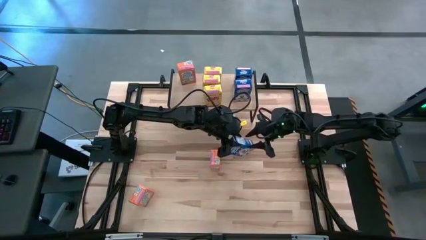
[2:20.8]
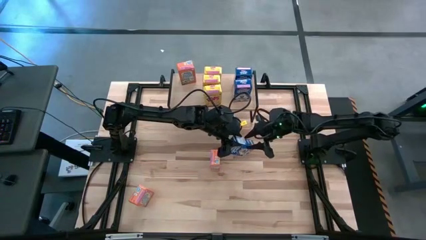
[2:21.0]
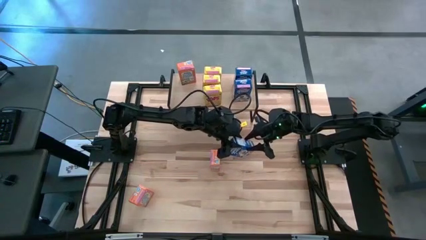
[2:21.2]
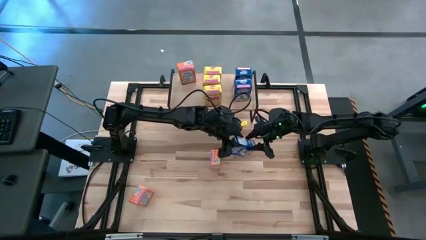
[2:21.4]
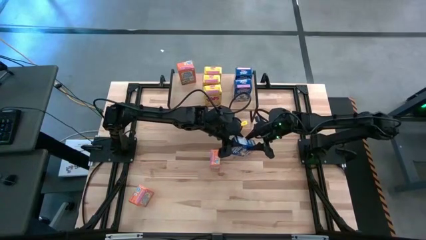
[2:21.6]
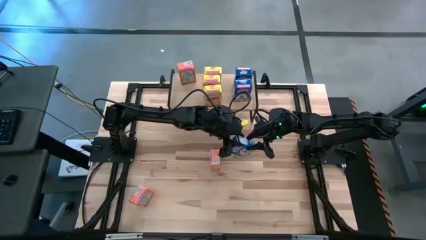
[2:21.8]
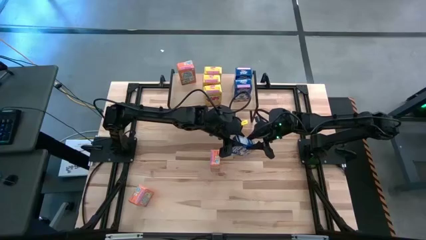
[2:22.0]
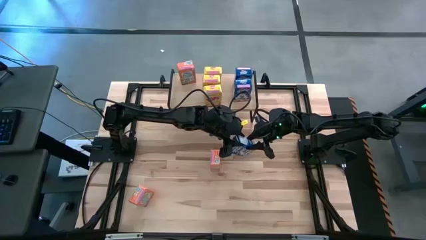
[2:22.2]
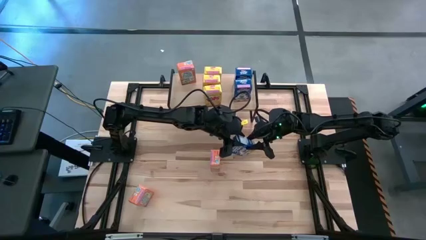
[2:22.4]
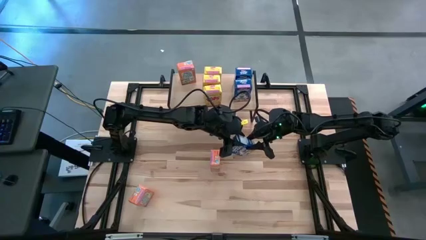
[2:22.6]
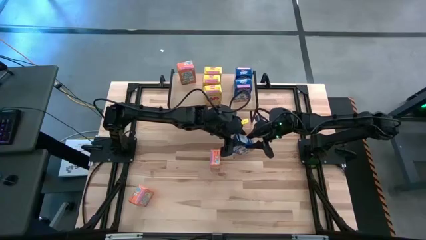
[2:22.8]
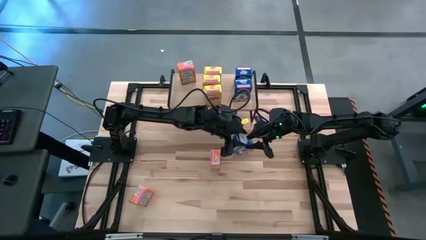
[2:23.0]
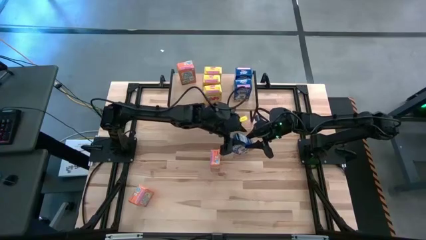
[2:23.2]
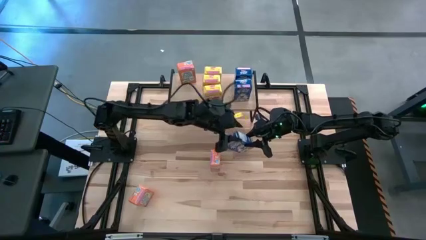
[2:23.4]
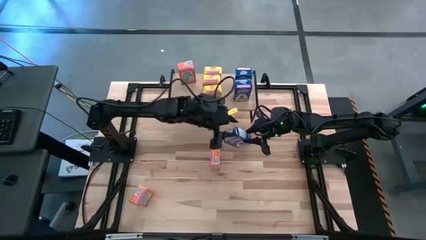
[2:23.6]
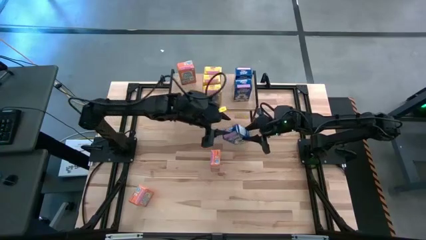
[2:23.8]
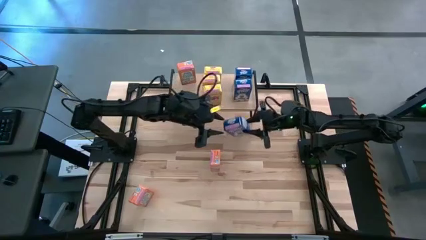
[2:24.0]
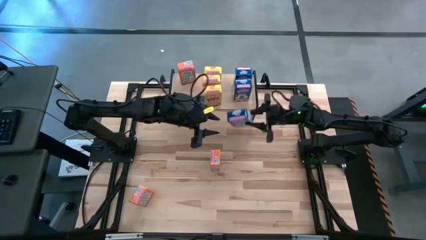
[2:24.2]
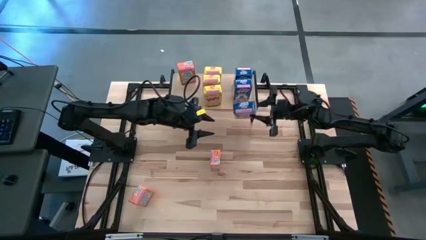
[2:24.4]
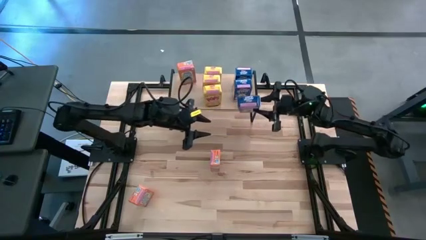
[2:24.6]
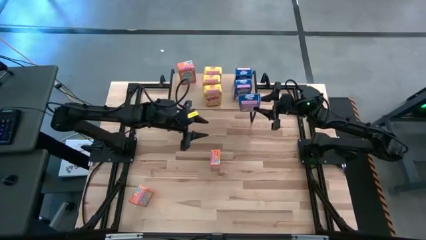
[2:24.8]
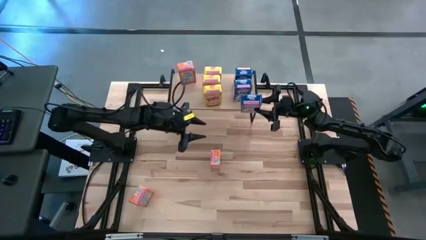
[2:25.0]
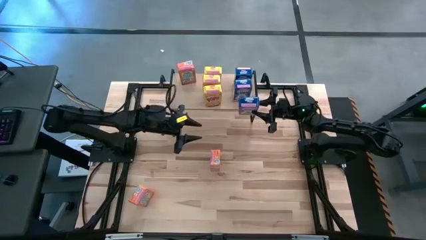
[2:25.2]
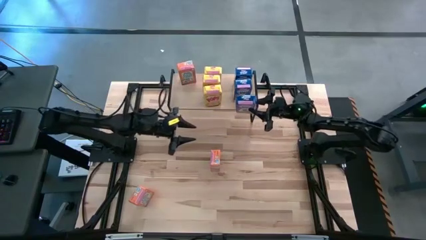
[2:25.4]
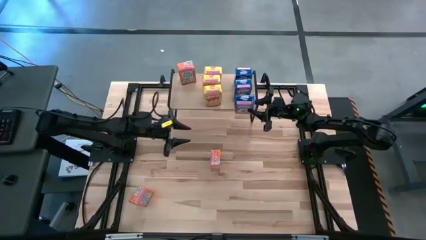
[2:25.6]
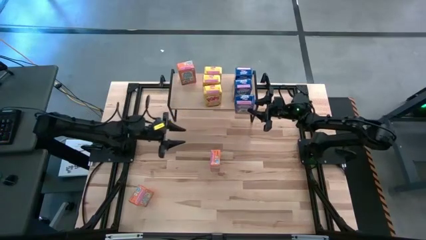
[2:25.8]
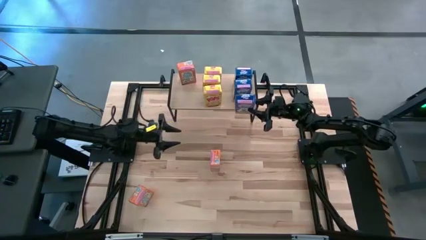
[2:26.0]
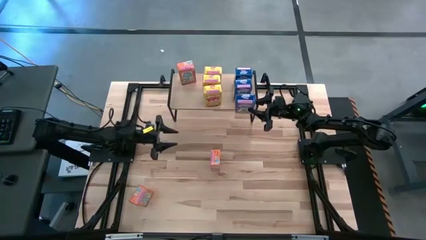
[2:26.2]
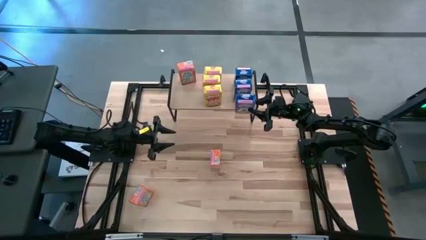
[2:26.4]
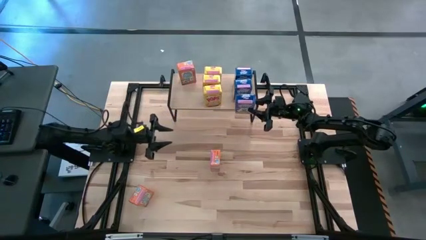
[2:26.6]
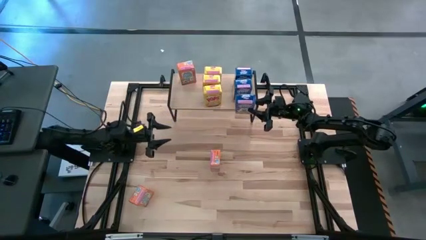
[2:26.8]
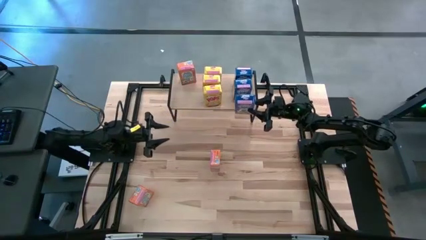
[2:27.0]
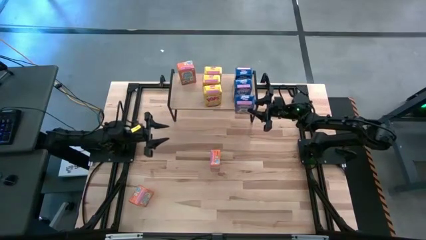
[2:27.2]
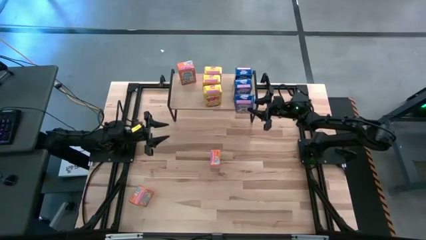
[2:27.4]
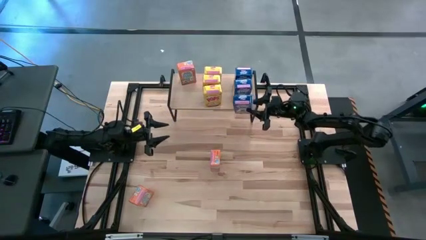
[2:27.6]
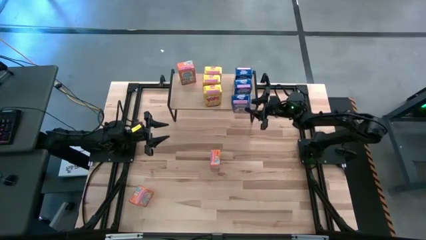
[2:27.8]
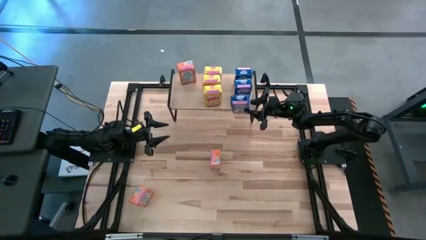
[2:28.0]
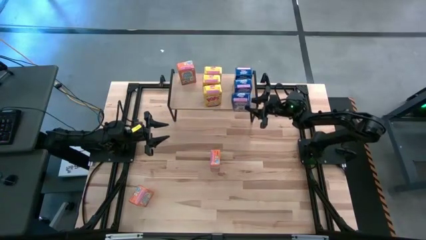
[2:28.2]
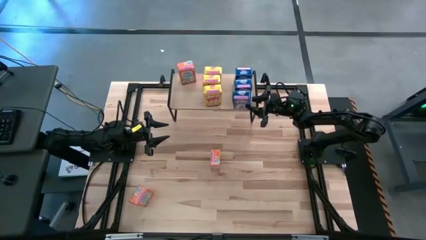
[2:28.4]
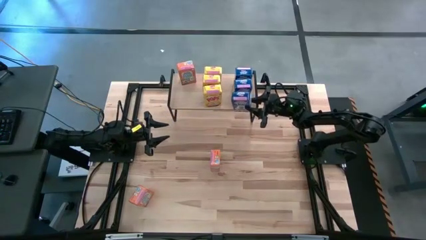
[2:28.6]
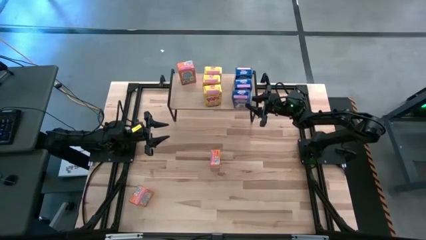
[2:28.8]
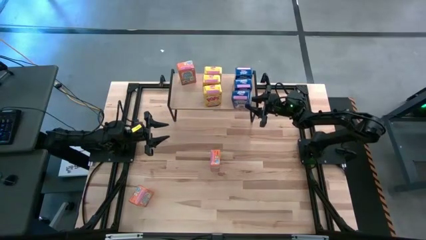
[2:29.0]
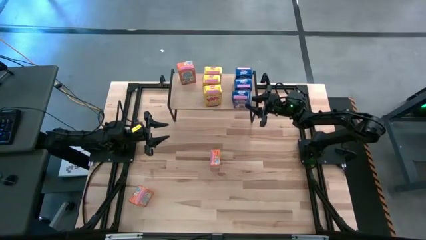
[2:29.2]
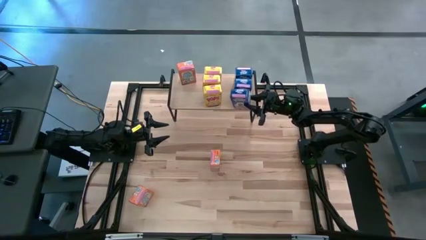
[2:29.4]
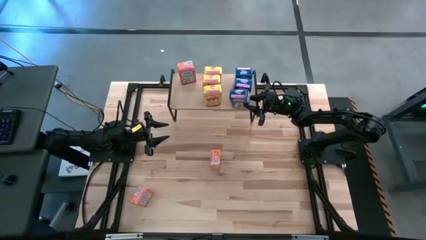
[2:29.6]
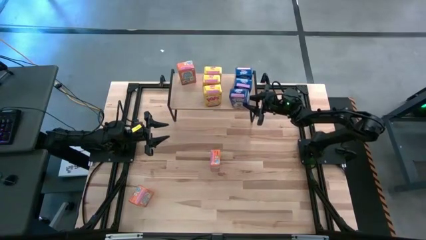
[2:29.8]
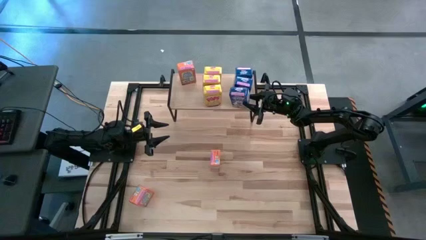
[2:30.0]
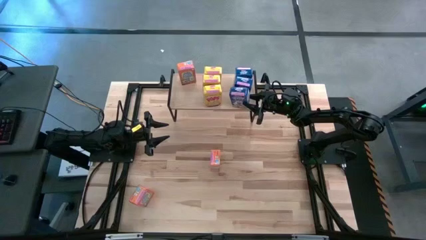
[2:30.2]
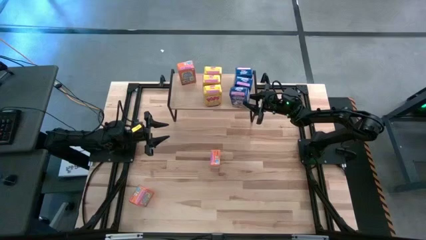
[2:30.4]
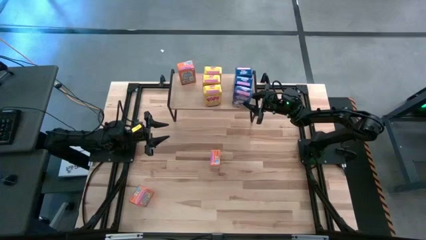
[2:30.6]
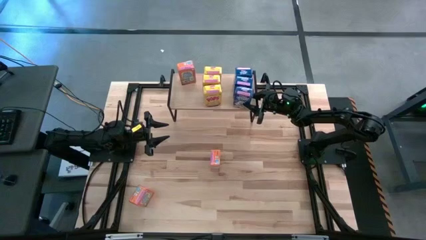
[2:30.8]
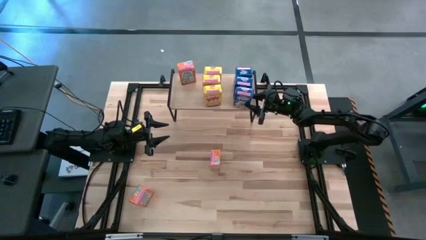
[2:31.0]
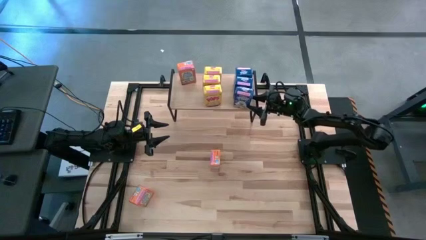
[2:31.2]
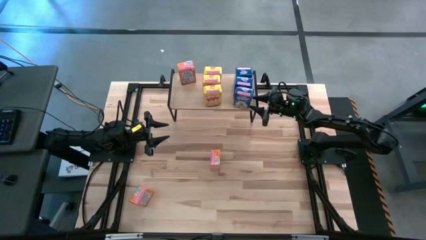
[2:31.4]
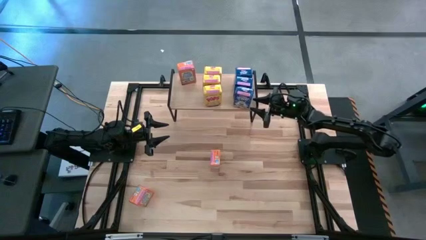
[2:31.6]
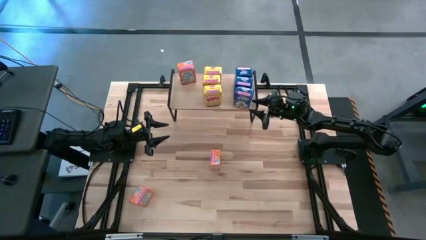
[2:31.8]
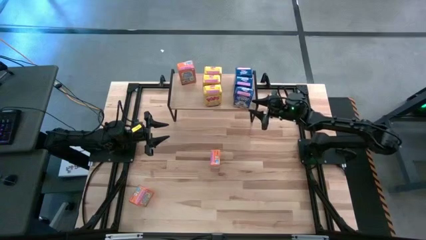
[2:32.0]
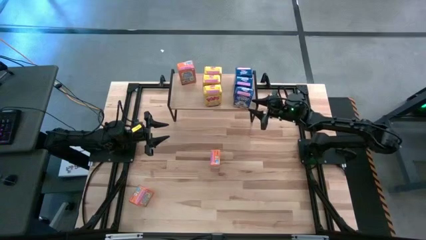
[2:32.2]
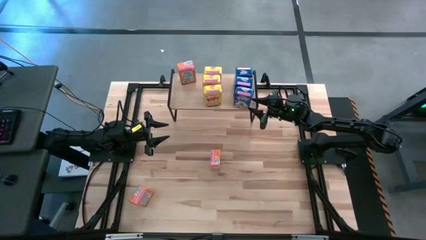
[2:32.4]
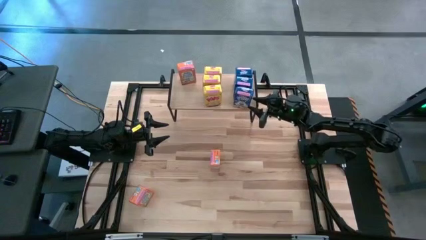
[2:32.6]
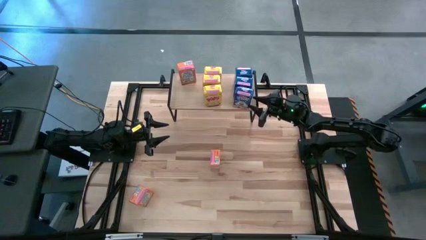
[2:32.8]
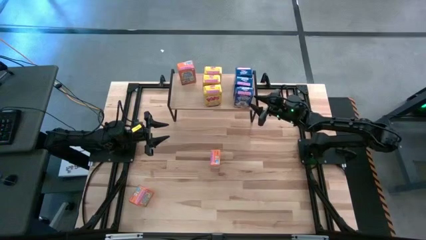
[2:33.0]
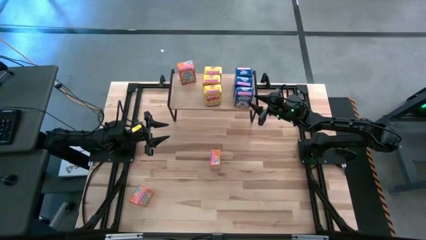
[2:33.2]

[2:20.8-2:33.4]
Task: Stack cereal on shelf
Put the blue cereal box on the shelf aligned with the other blue cereal boxes
